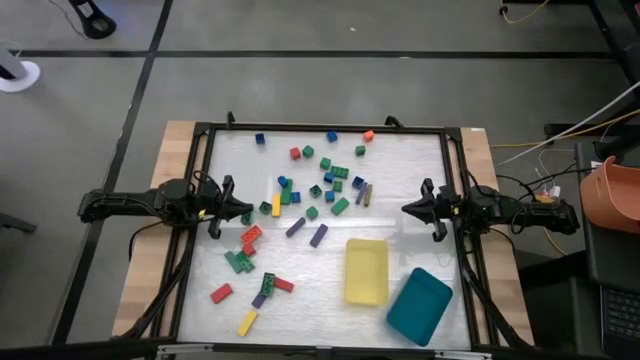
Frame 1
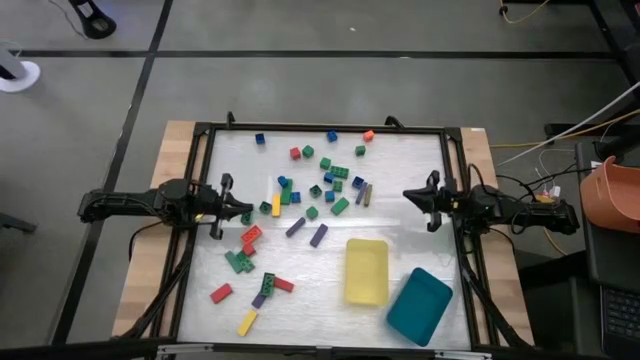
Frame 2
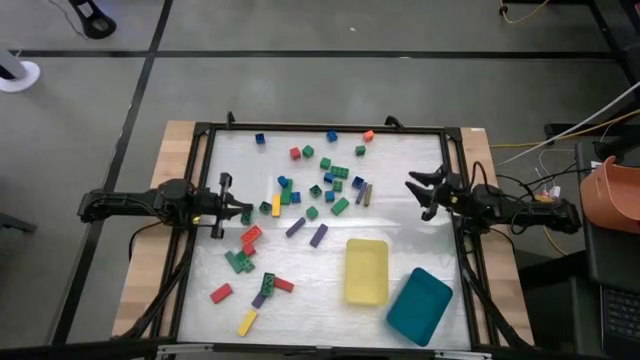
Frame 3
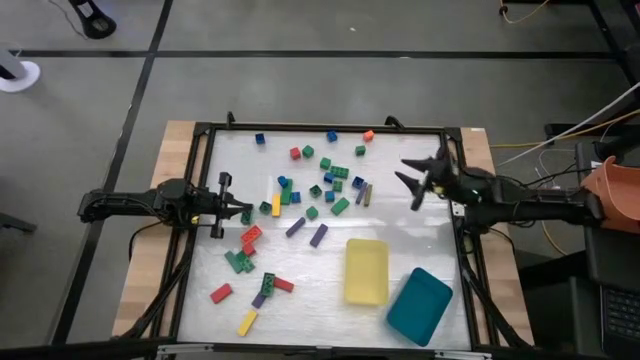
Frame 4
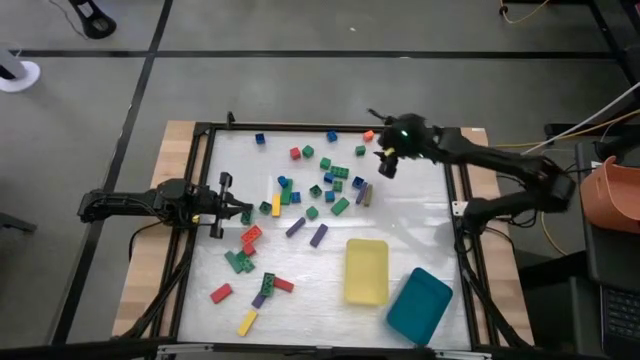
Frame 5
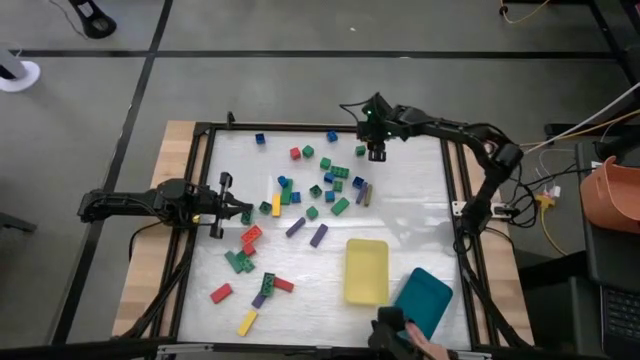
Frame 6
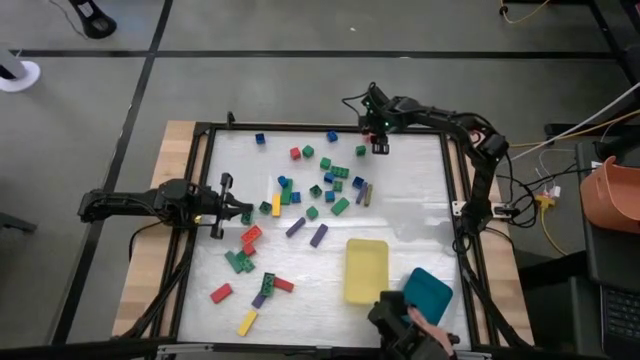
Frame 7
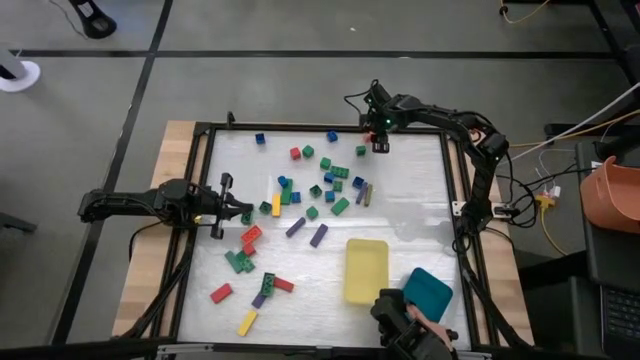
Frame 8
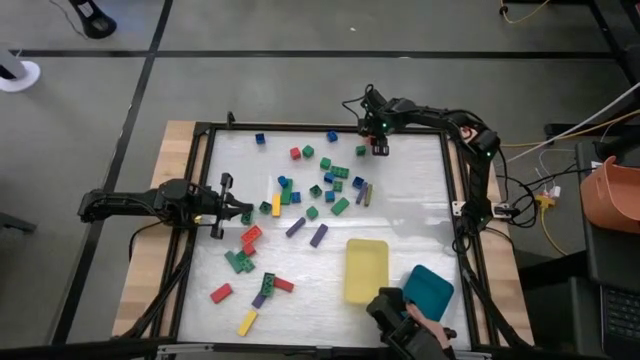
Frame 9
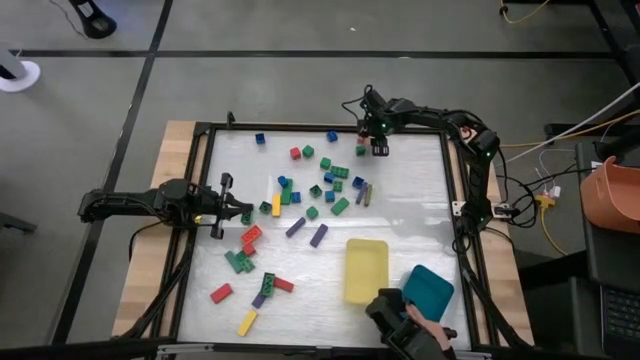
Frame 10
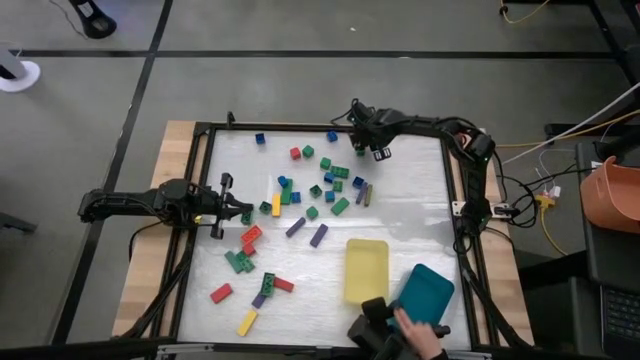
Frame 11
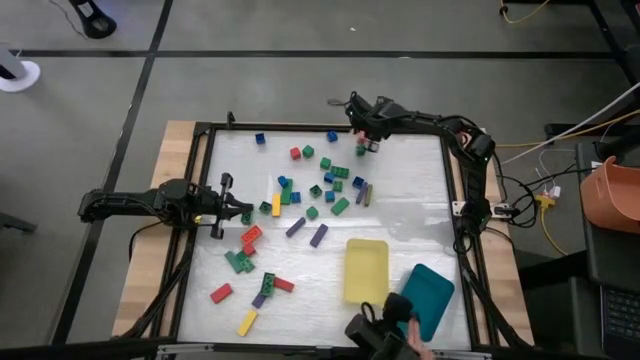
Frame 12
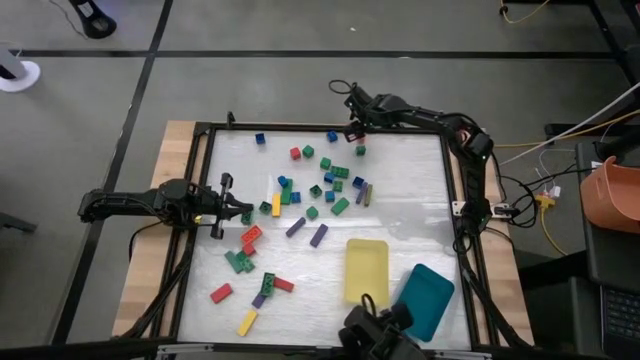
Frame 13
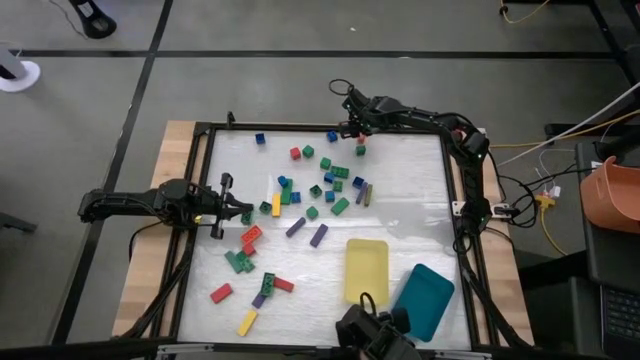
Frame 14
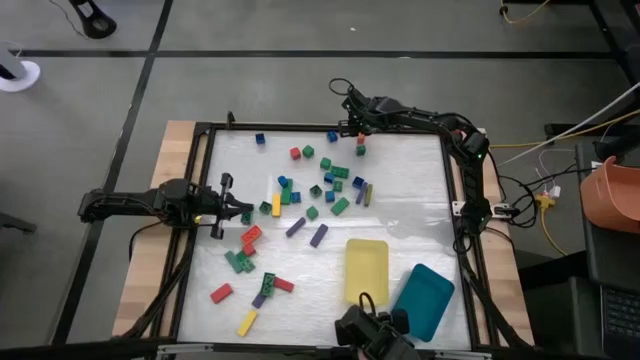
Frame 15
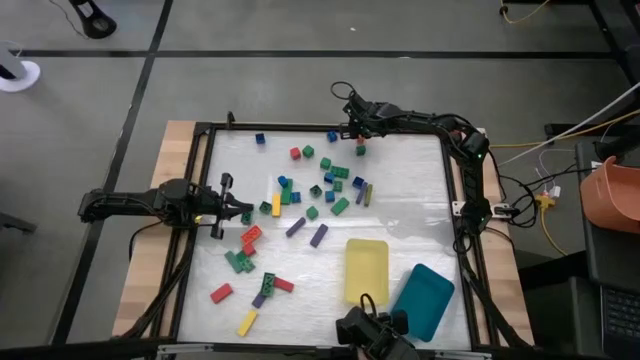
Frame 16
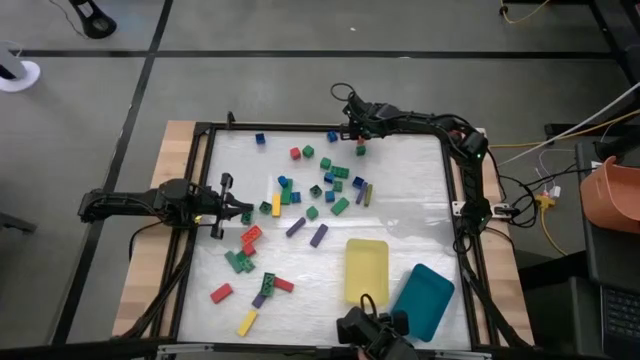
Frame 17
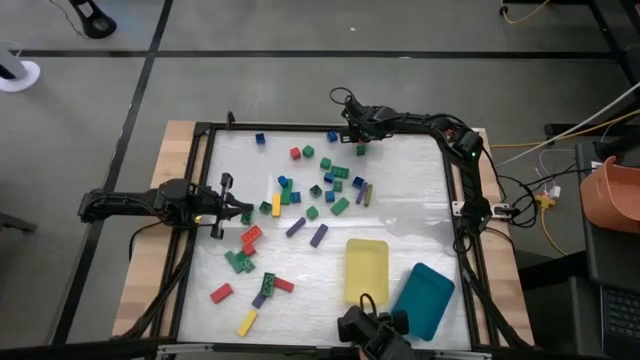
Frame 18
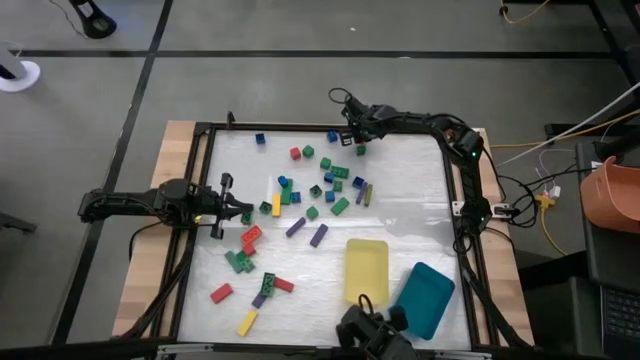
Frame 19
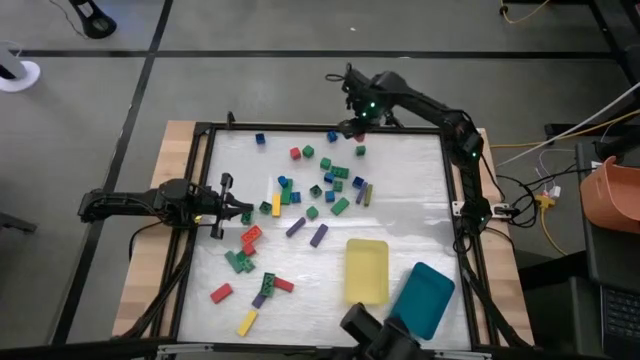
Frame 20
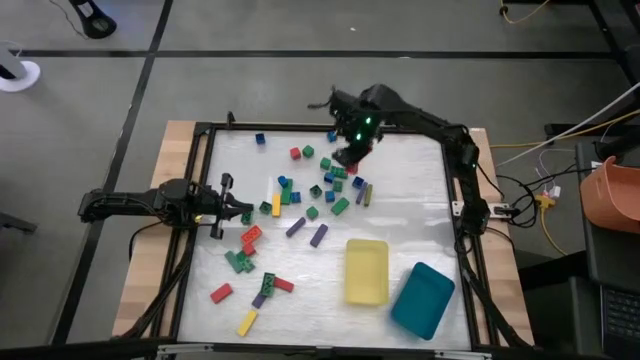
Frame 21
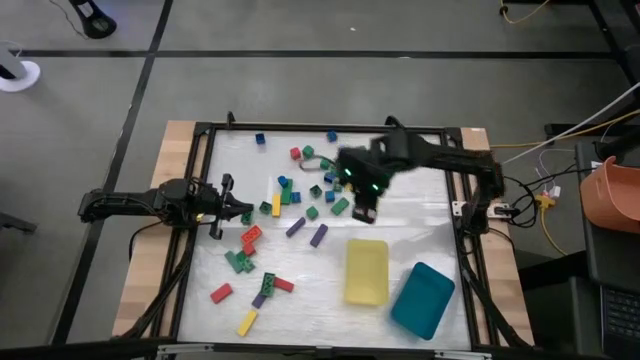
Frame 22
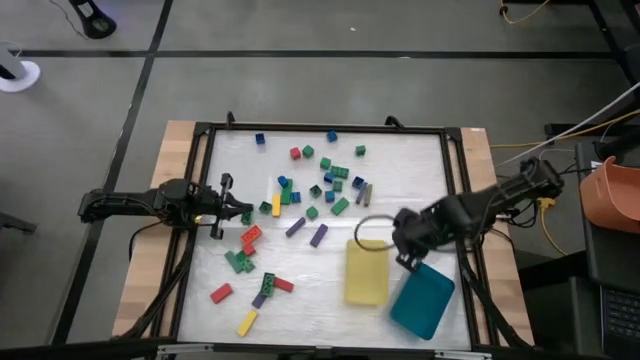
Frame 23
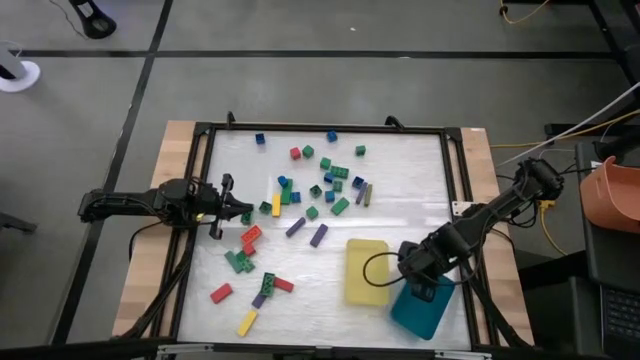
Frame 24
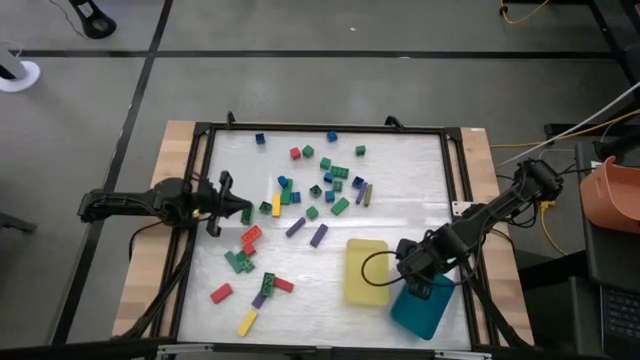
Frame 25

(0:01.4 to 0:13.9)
Task: Sort blocks by size
Put the small orange game piece into the blue bin

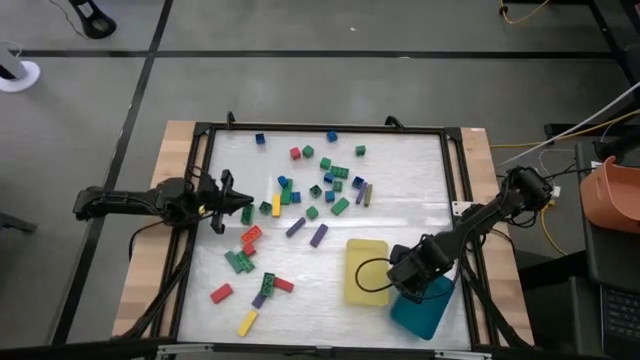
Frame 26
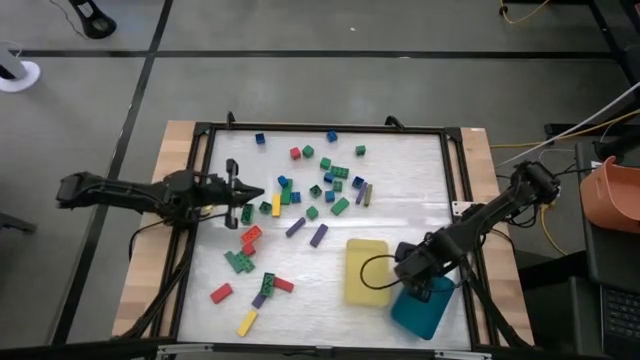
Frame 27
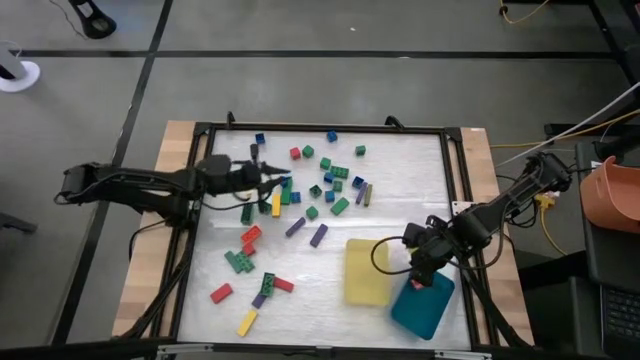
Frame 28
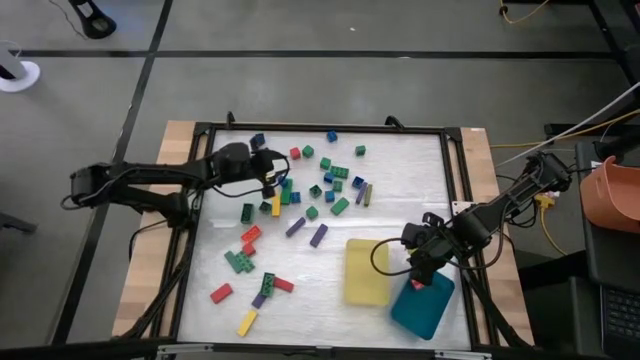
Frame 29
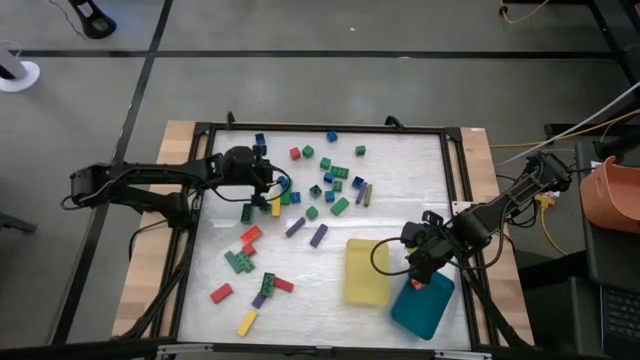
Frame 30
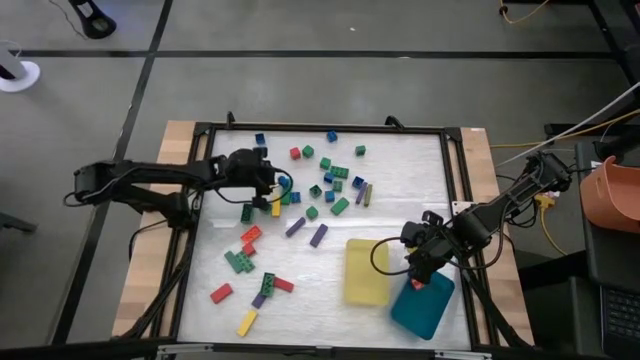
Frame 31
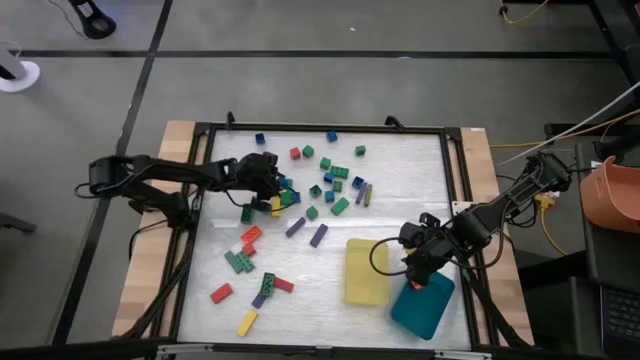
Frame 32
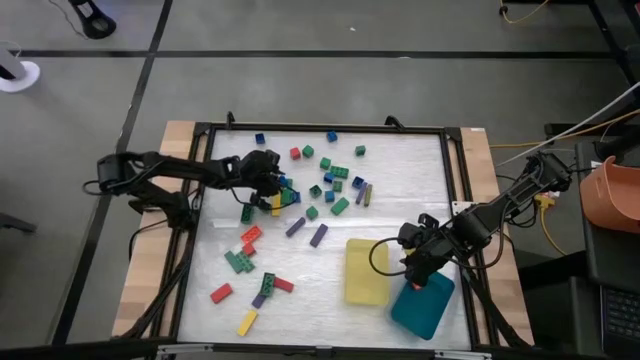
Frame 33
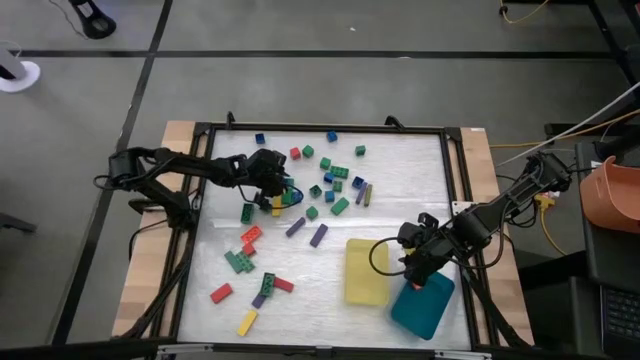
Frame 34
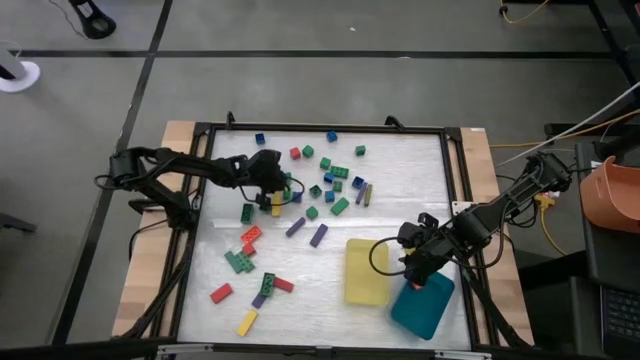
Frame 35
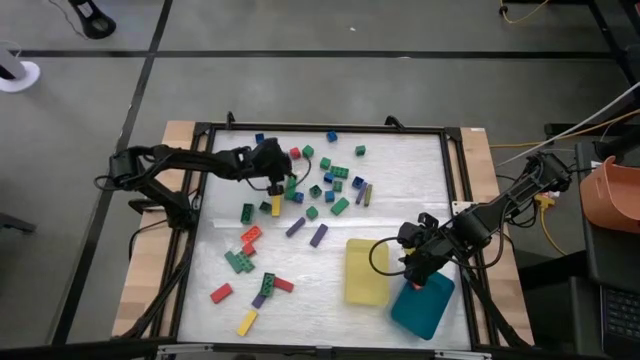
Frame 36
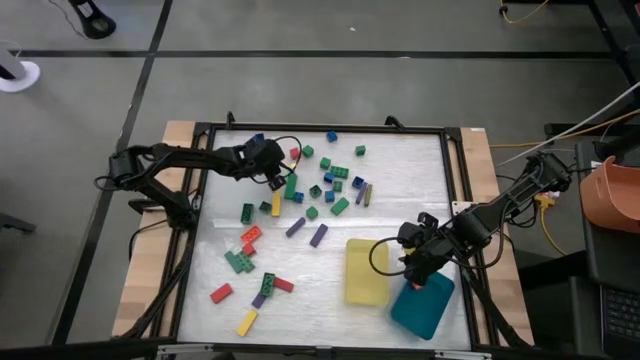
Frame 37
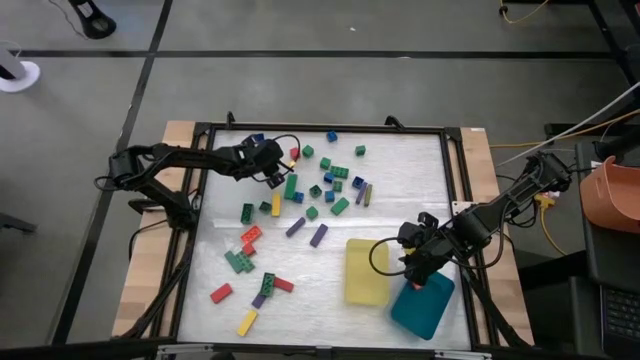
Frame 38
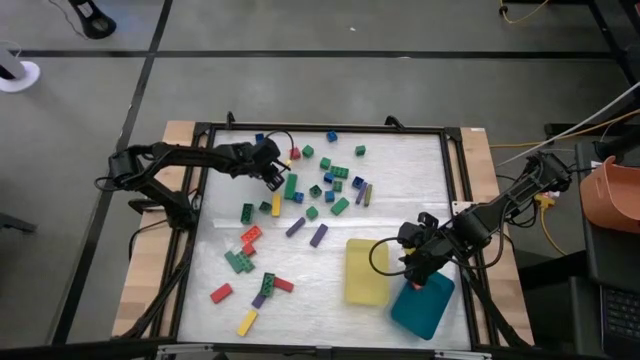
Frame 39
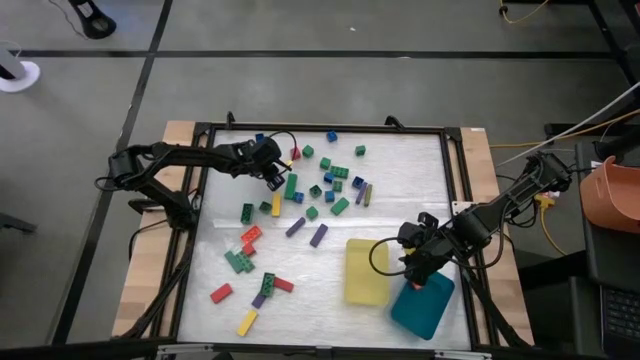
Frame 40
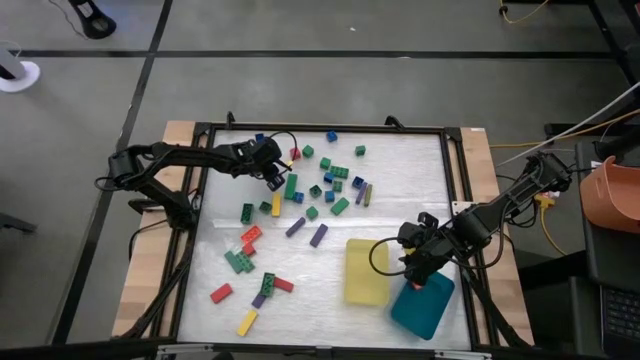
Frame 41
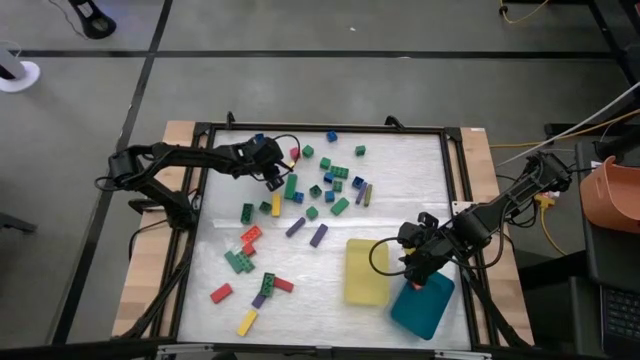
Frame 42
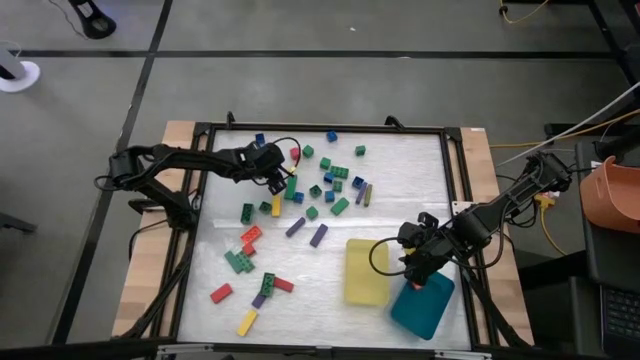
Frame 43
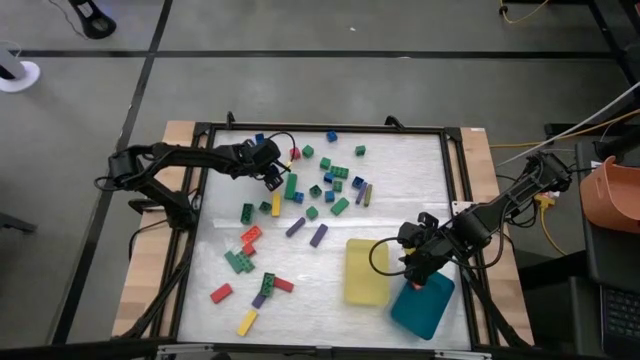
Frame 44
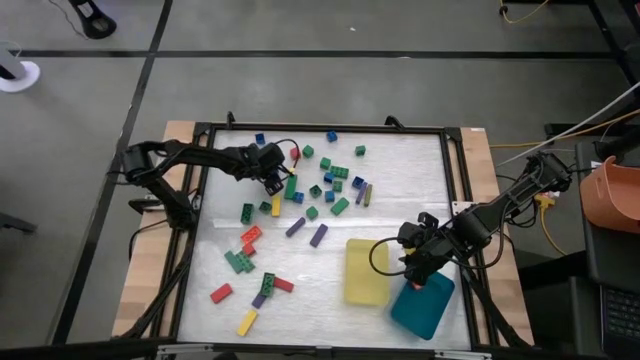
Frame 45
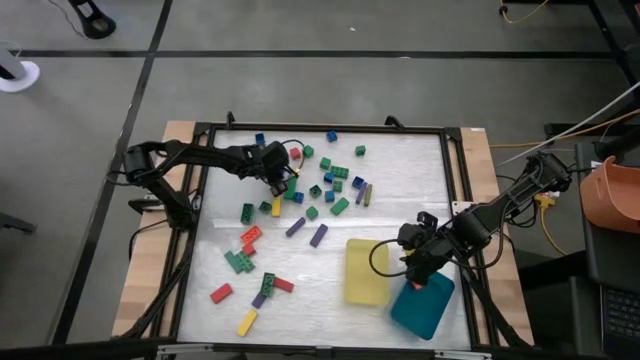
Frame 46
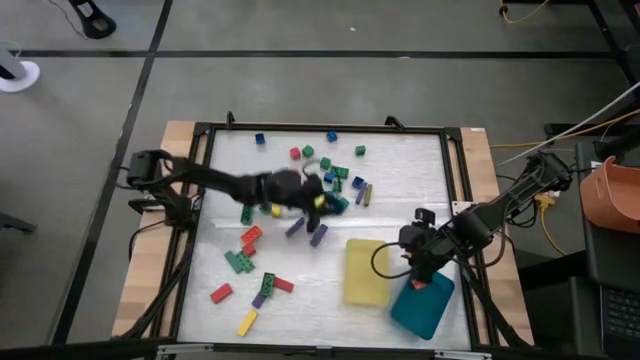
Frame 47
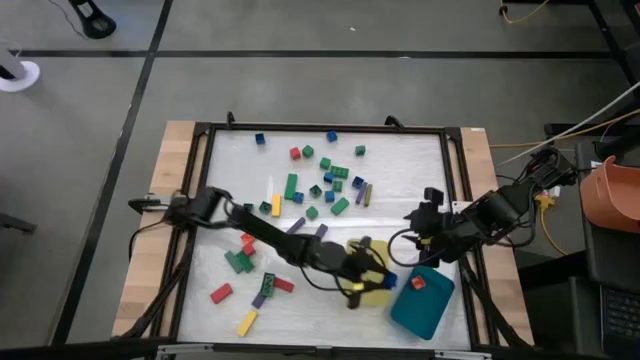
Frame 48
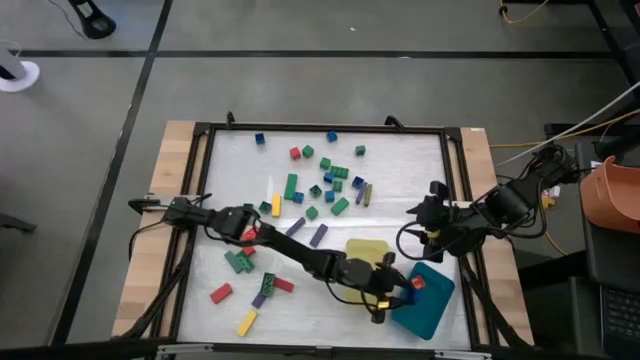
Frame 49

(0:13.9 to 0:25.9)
Put the small blue game piece into the blue bin
